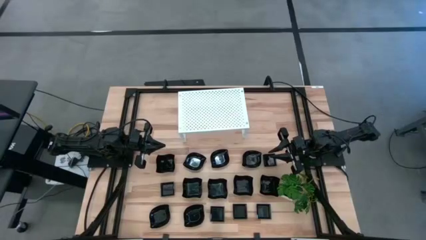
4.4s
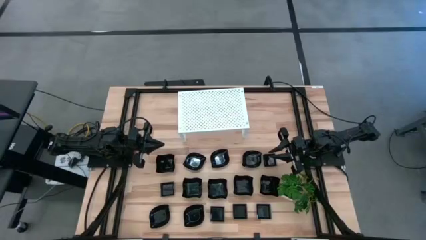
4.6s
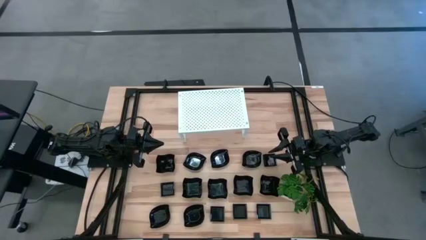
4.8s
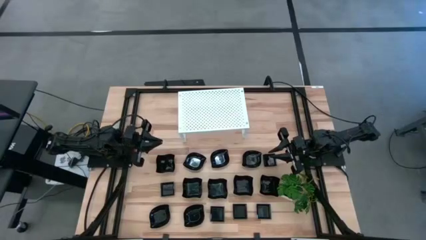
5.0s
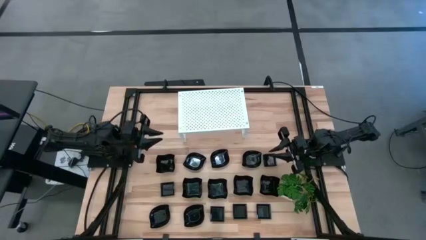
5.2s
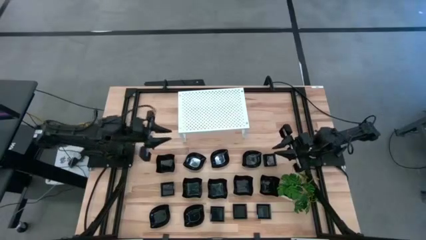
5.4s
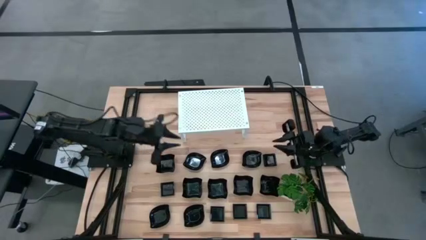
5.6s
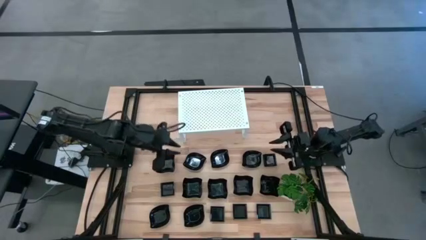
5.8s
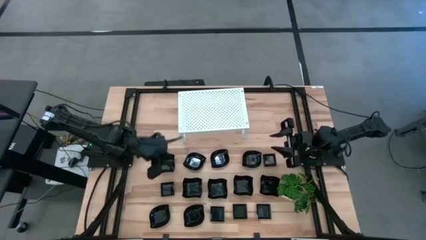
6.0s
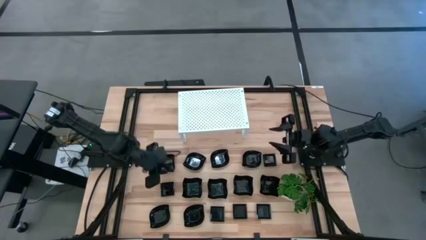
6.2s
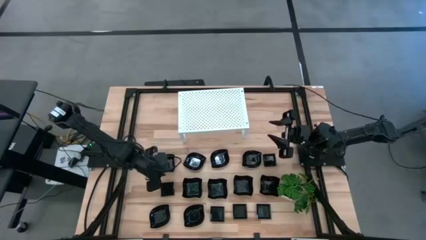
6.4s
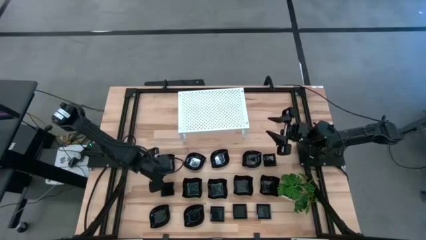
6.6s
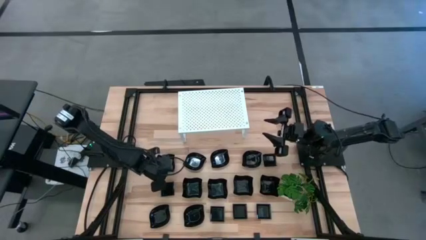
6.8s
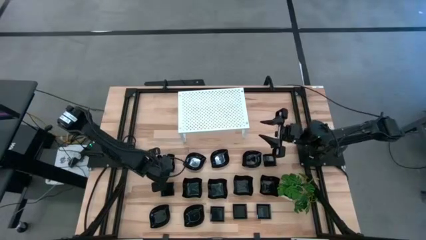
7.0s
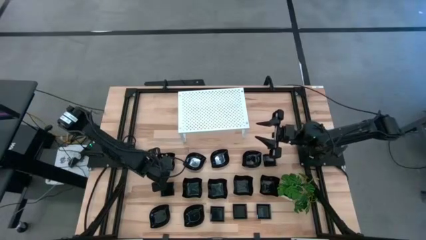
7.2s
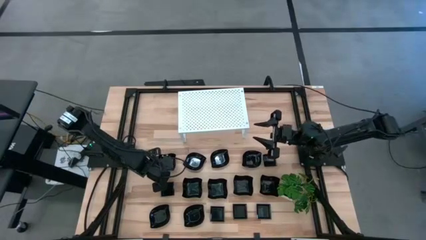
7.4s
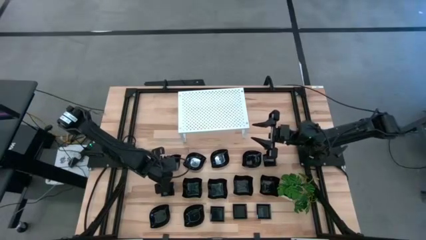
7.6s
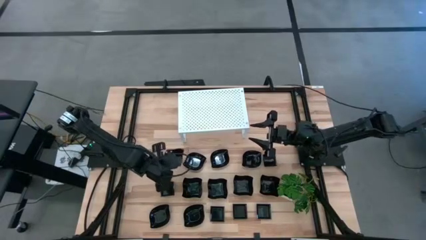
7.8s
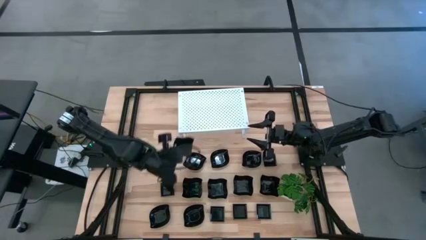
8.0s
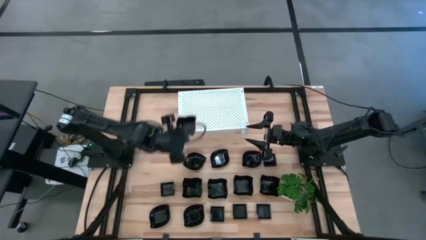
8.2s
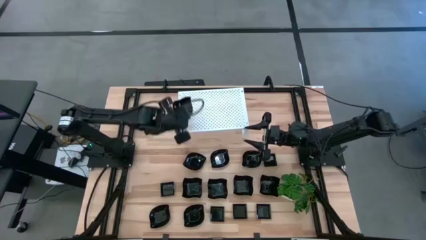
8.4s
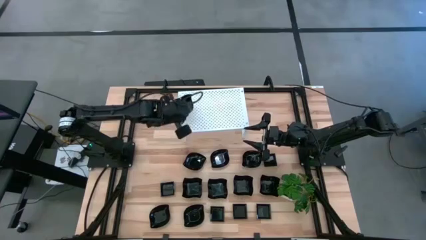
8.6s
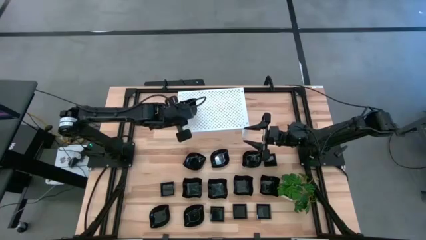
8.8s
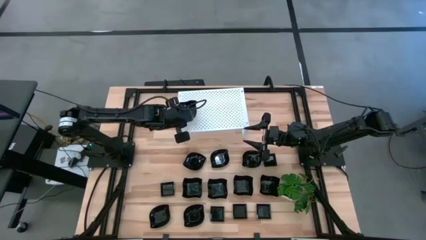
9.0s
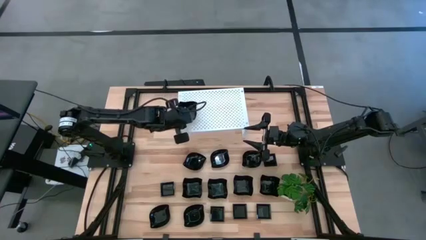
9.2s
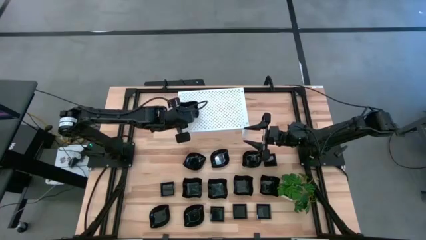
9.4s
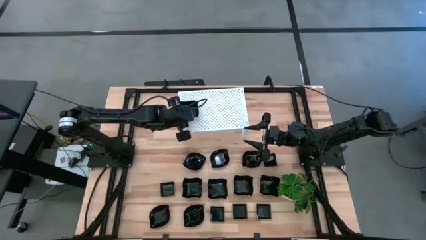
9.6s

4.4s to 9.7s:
Task: Pick & Place Mini shaped plates
Put the black distorted square plate on the shelf

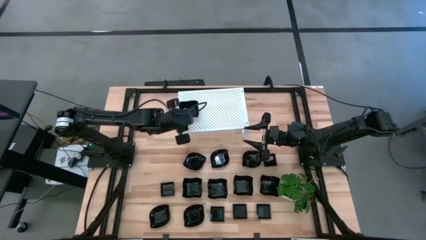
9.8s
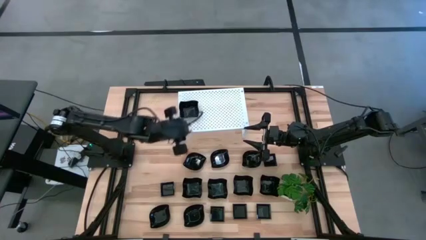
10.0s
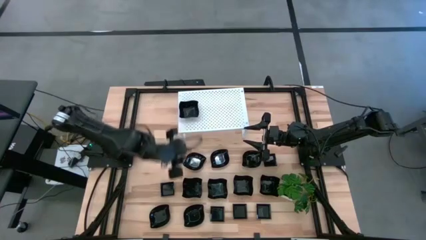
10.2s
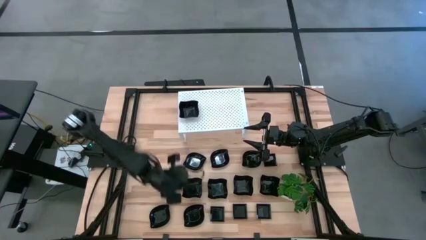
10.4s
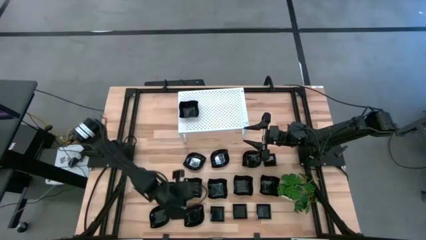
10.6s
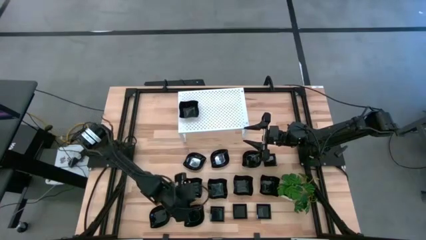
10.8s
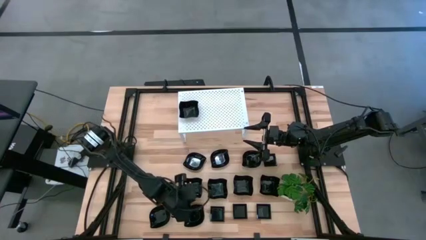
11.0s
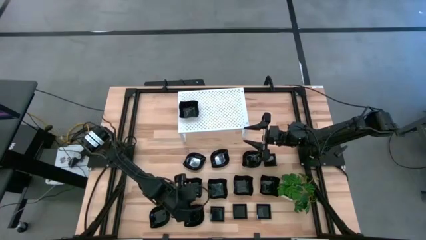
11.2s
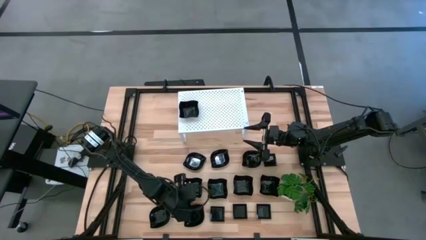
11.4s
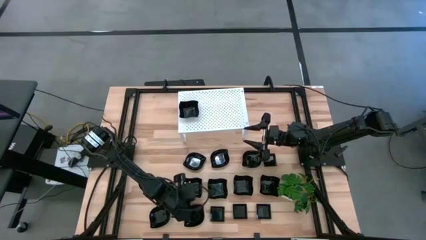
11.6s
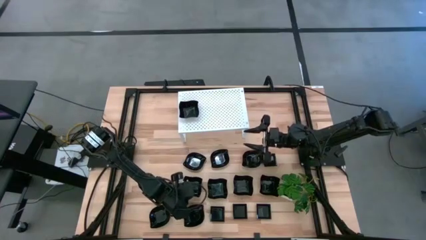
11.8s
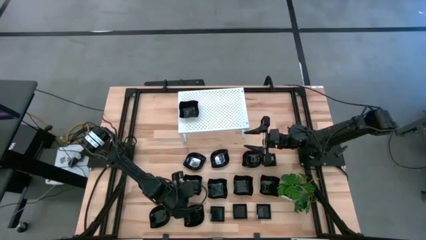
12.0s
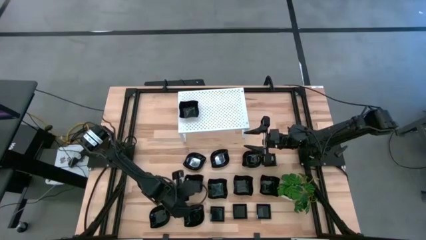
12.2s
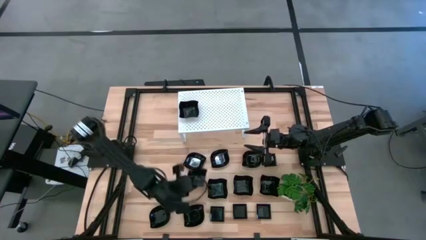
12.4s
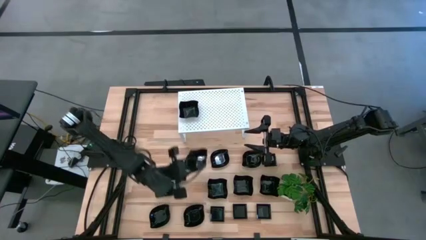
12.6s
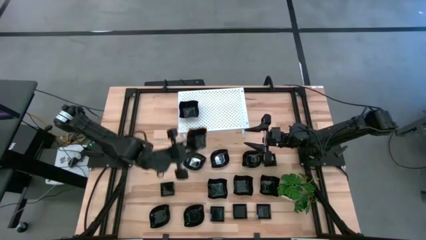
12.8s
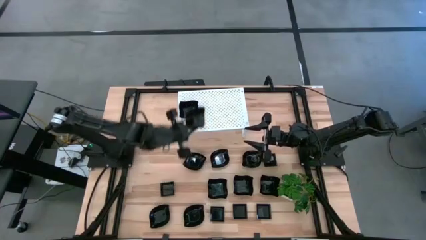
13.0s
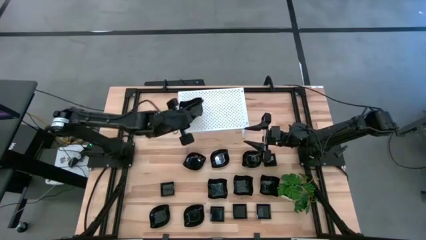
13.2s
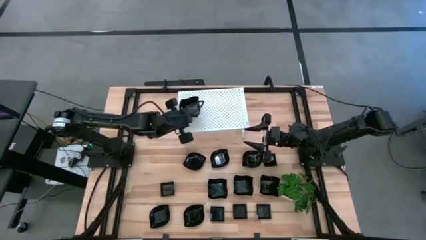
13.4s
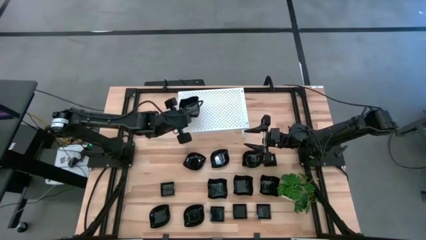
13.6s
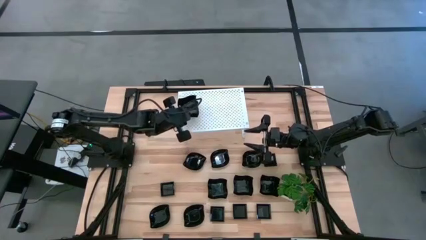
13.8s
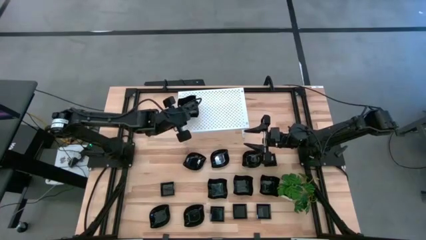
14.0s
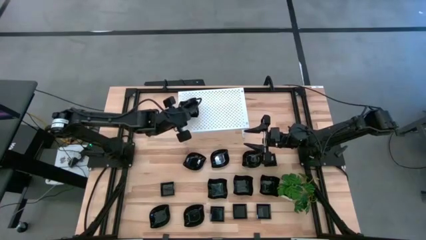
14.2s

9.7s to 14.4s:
Stack the black distorted square plate on top of the black distorted square plate on the shelf

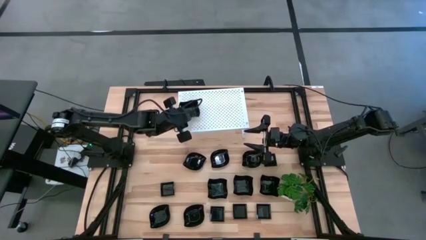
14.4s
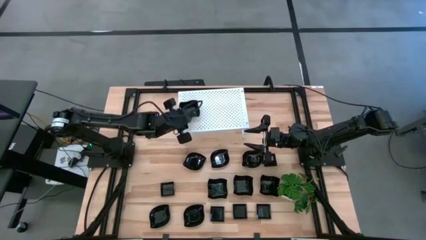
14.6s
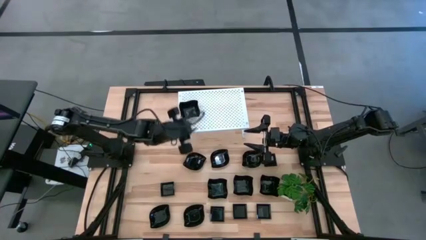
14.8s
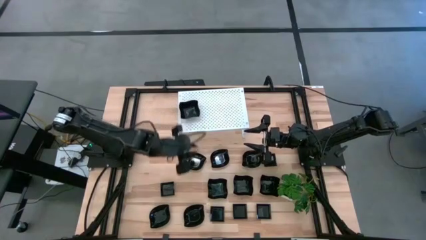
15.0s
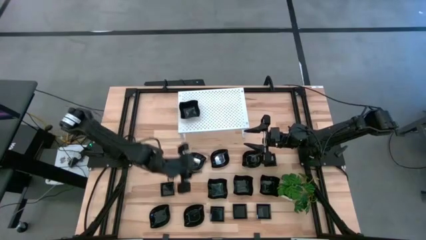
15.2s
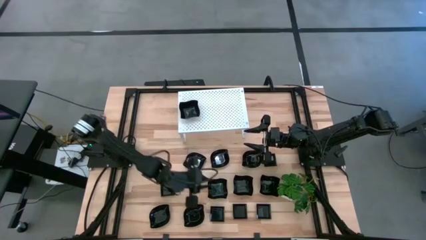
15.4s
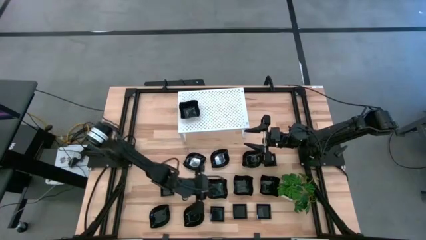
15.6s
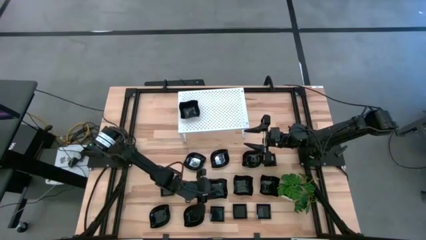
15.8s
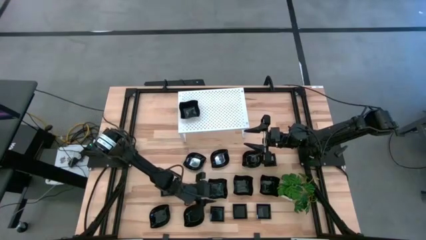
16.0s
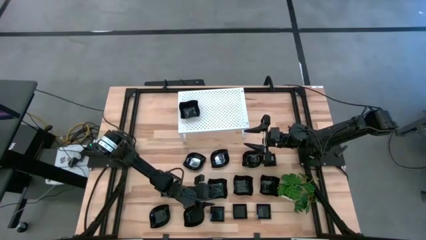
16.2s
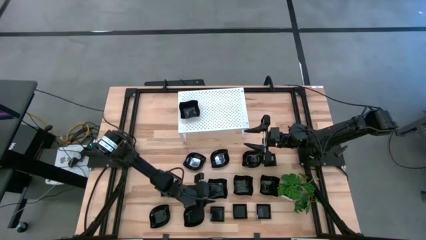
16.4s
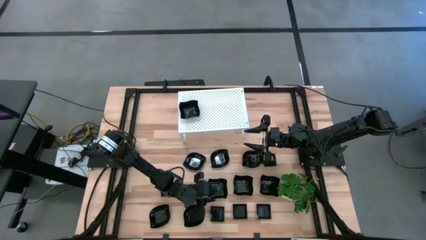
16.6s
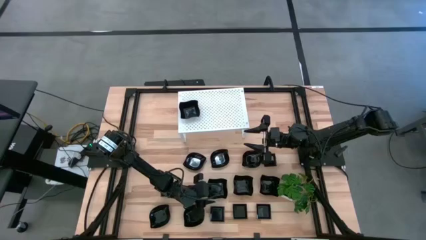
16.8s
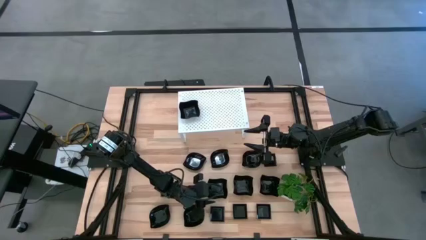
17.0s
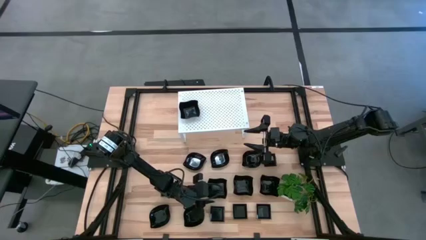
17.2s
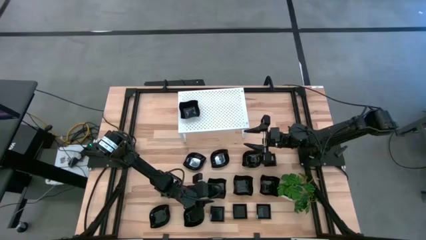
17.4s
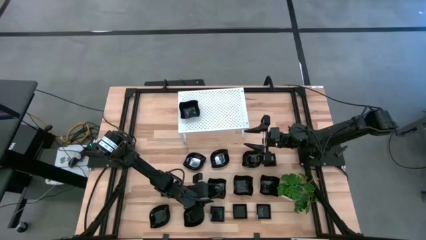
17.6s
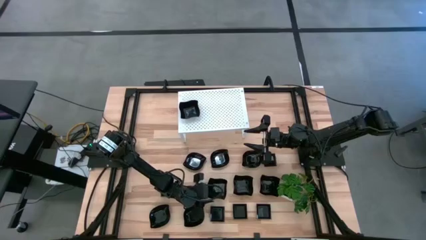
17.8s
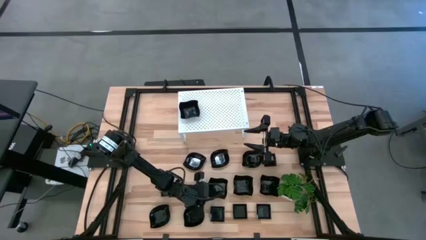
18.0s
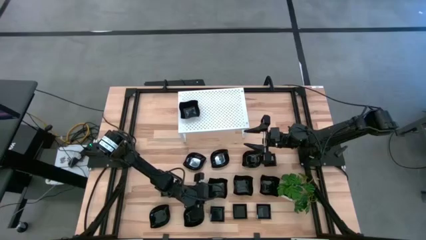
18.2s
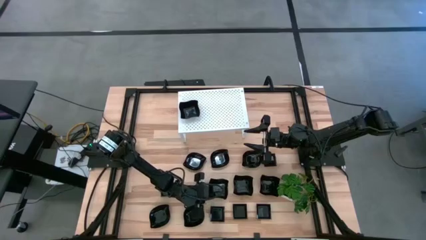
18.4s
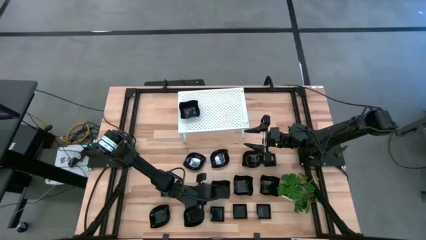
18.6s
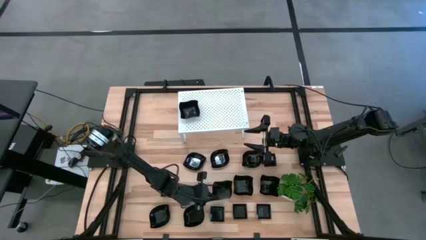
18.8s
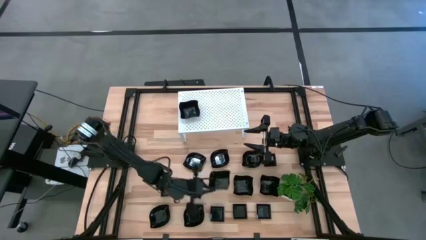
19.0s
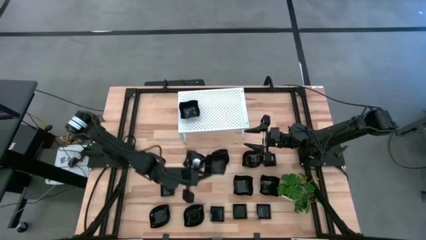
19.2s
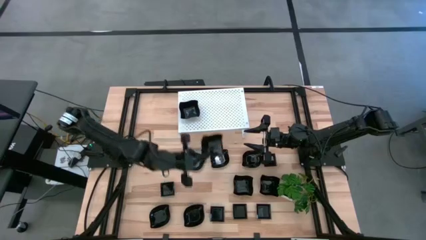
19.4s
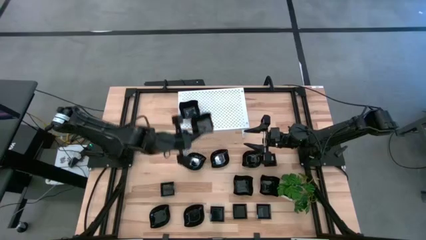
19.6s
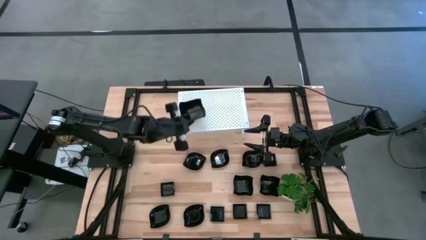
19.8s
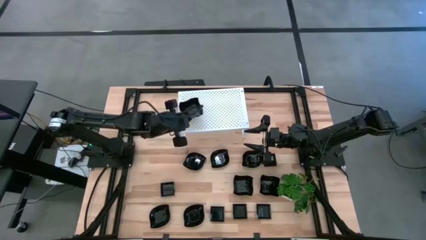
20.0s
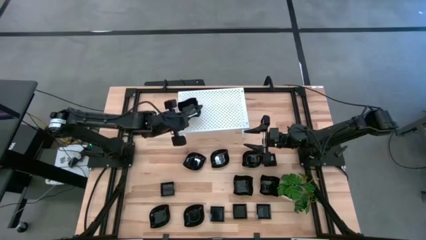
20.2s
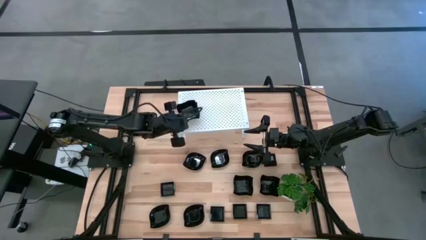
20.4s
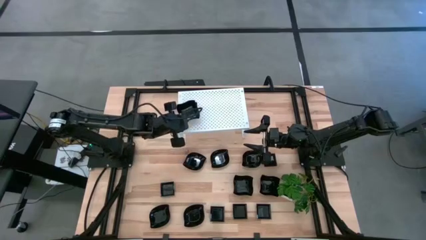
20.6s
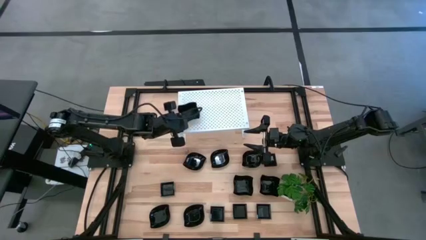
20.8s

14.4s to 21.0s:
Stack the black distorted square plate on top of the black distorted square plate on the shelf
